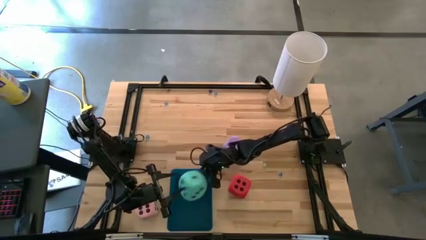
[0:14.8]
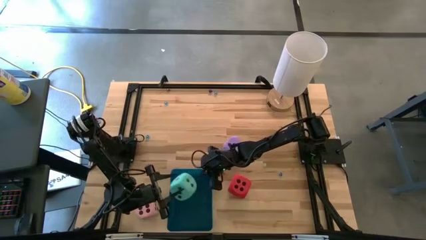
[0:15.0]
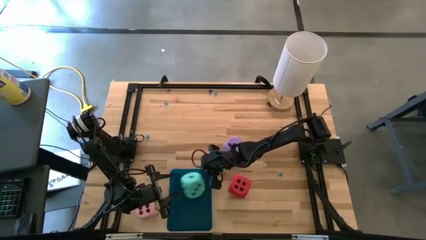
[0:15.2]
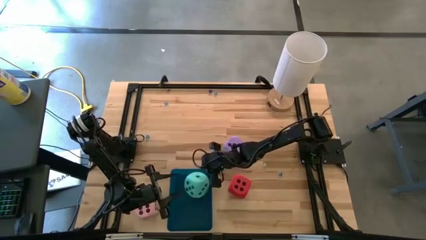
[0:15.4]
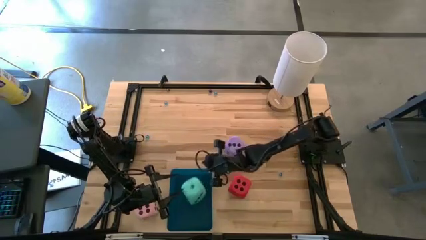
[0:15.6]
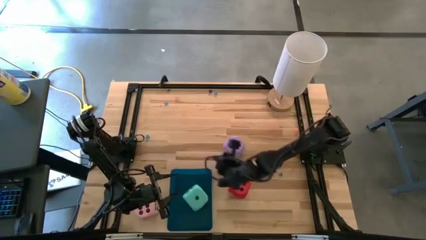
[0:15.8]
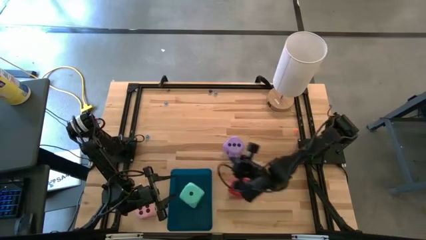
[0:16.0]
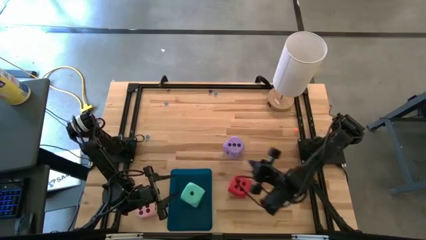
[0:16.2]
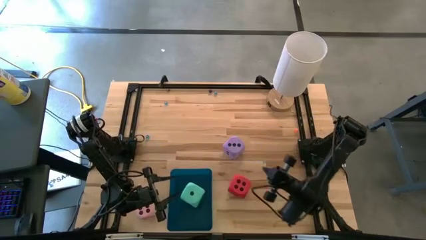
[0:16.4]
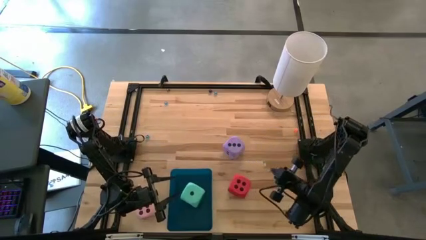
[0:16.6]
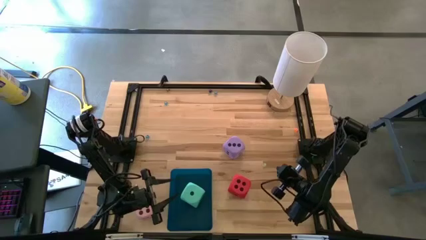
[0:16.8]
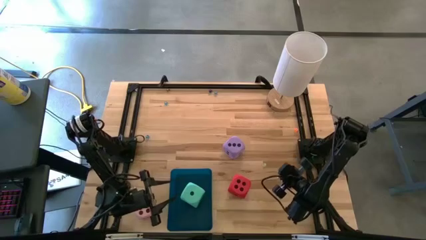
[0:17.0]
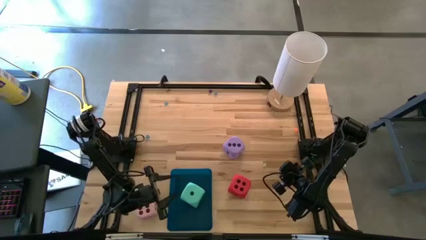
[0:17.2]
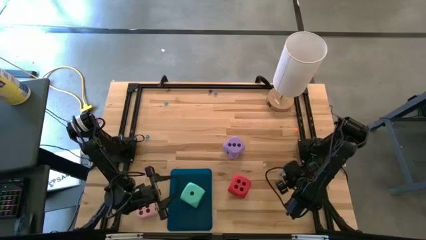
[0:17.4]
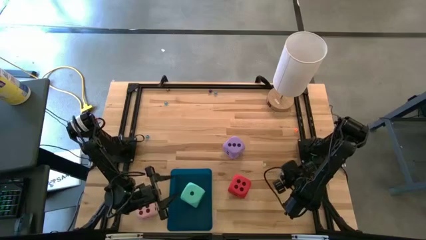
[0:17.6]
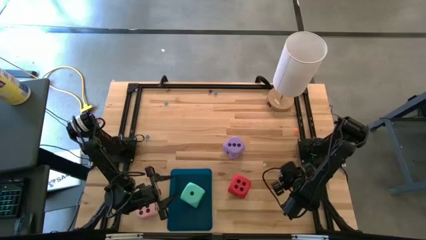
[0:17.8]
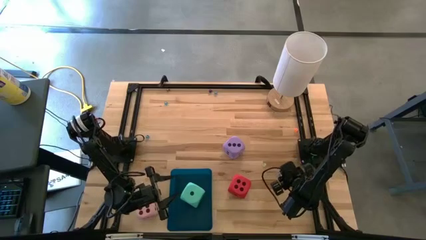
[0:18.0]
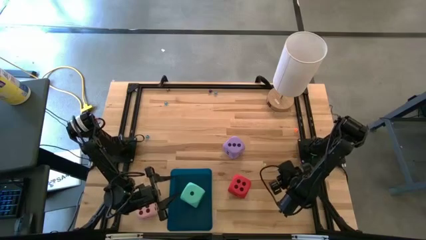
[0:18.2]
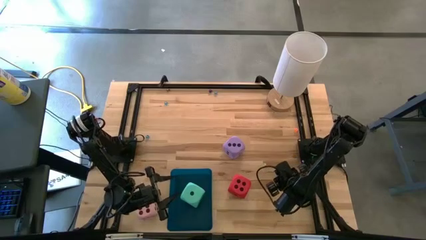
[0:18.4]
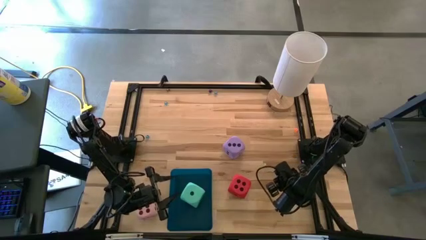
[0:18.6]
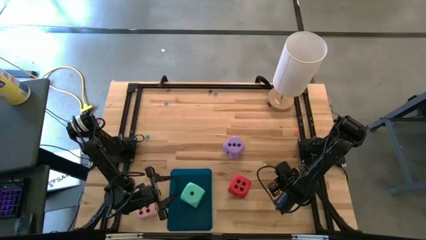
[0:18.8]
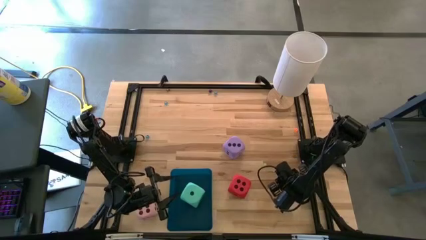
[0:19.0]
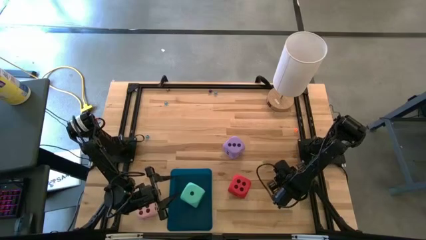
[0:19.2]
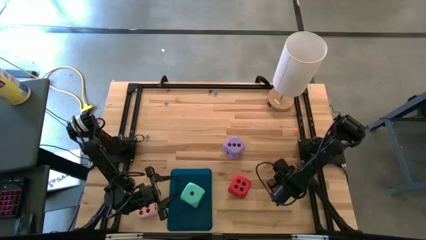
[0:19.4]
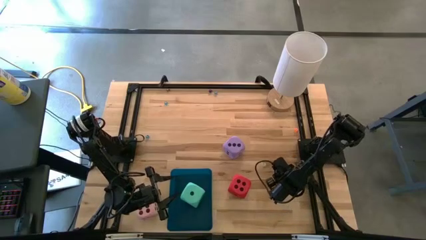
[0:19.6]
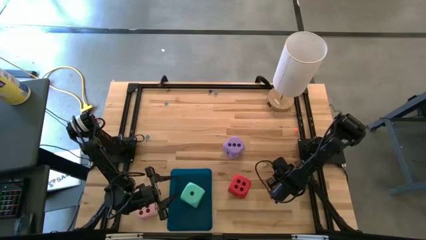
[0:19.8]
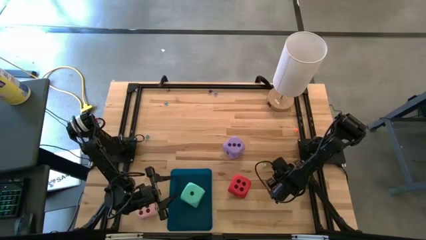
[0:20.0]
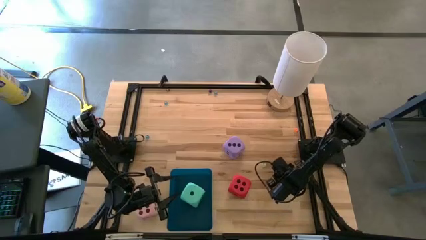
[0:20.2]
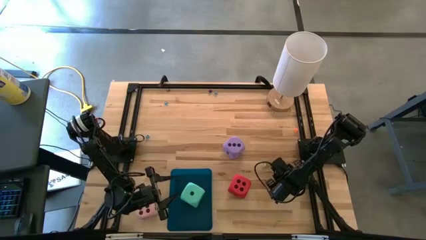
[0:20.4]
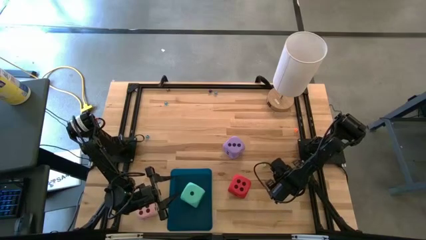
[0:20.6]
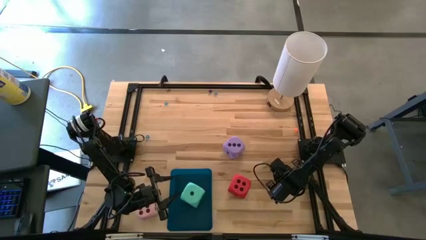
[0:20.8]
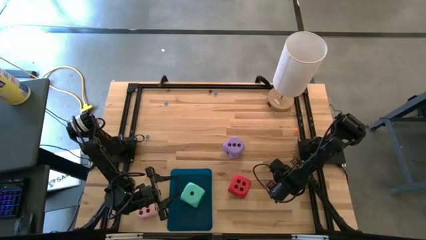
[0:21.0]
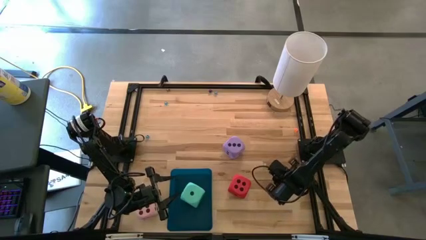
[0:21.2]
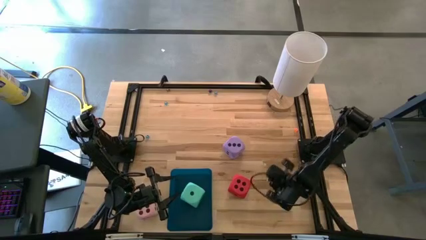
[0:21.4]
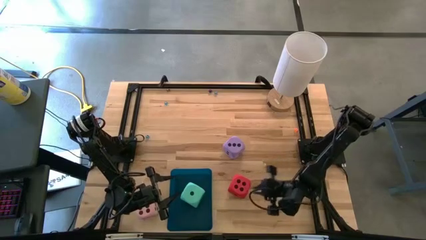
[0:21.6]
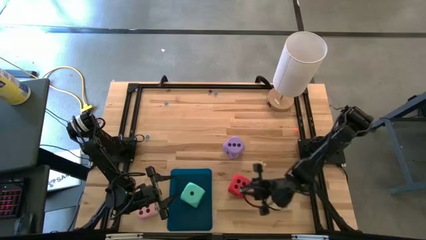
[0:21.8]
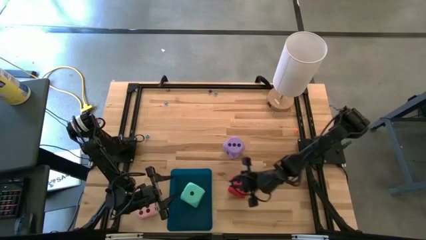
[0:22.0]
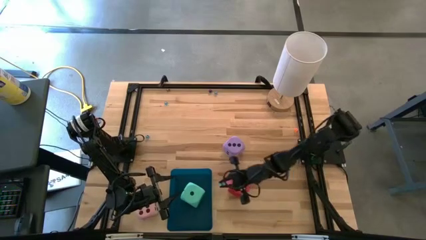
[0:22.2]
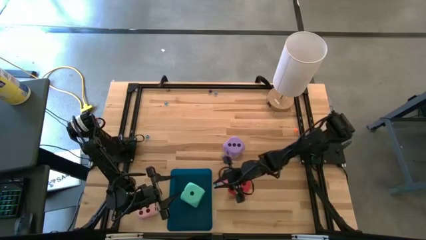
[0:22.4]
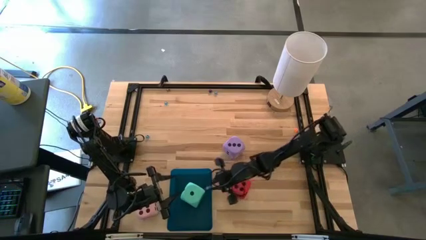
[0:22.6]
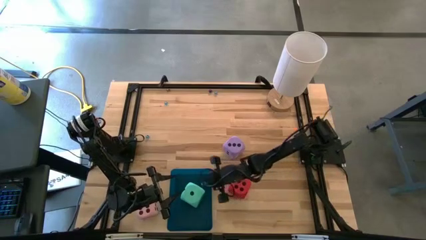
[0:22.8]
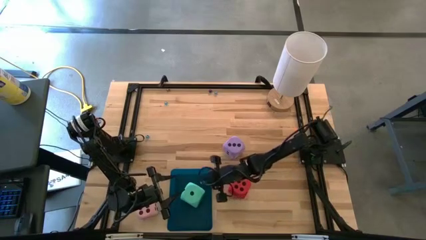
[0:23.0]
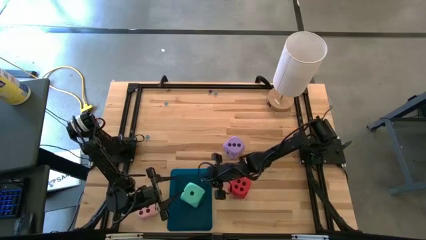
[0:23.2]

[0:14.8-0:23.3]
Task: Pick & Place Dice
Put the small light blue die into the blue bin
